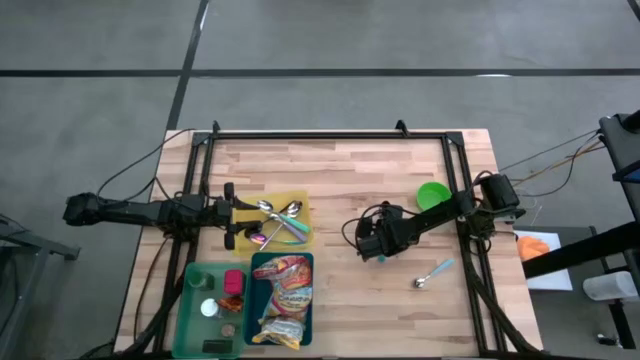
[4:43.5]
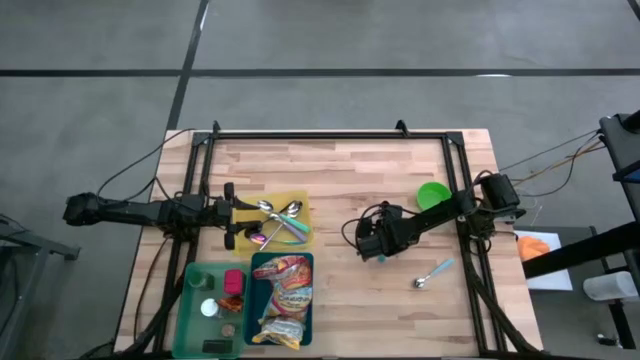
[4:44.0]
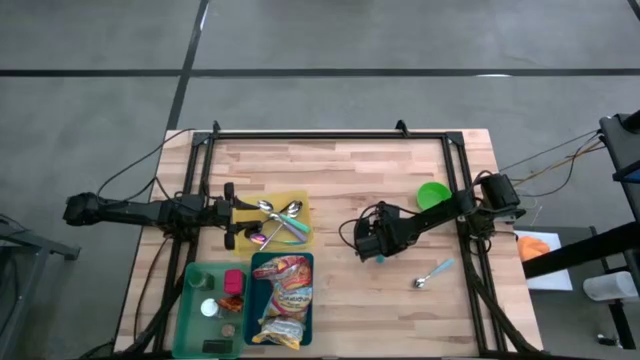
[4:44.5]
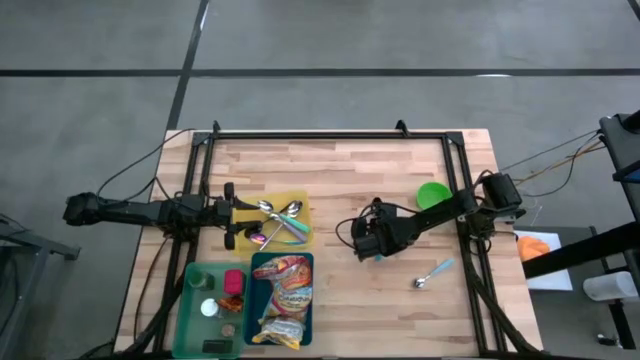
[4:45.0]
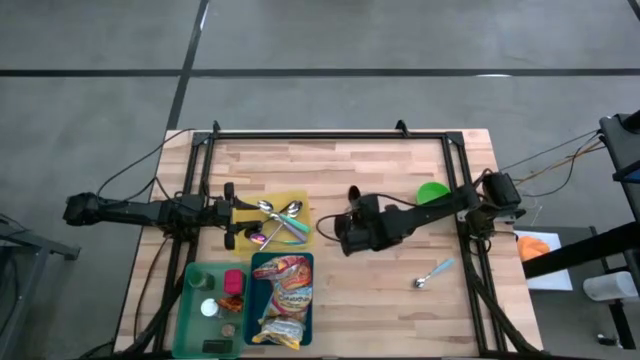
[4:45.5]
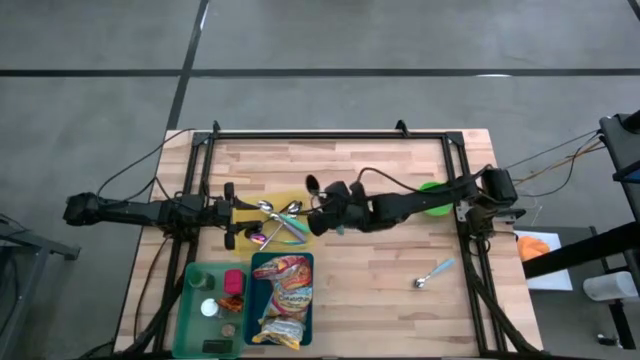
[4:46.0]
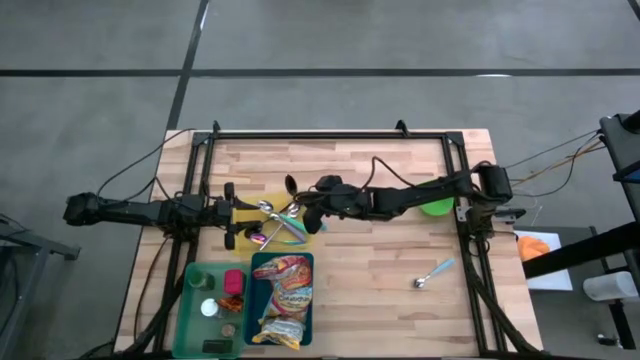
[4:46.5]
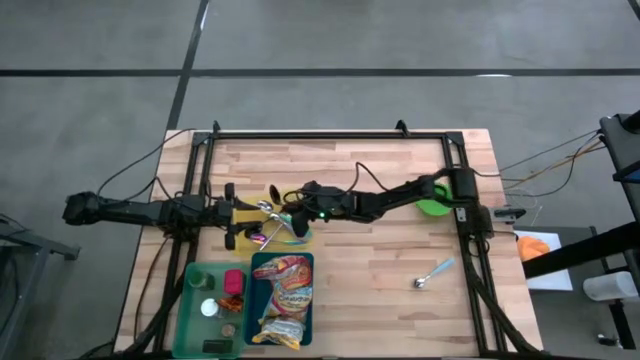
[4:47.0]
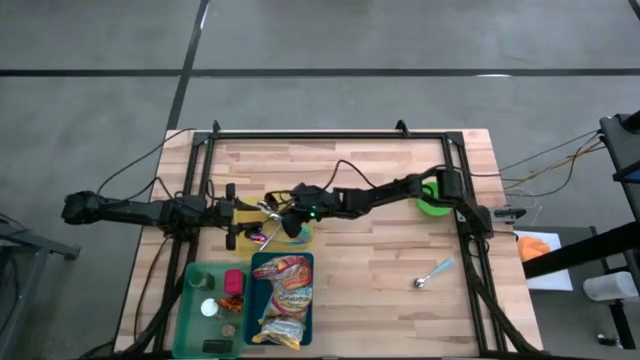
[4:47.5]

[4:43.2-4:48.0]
Put the blue spoon into the yellow bin

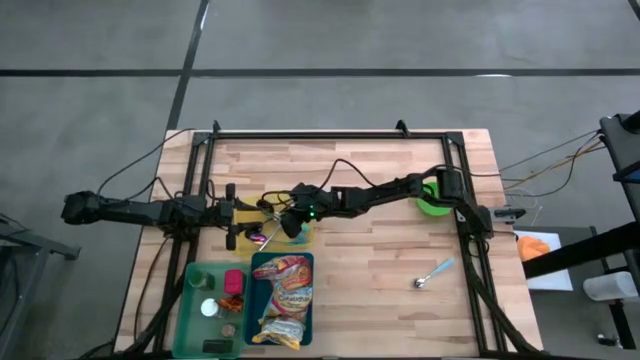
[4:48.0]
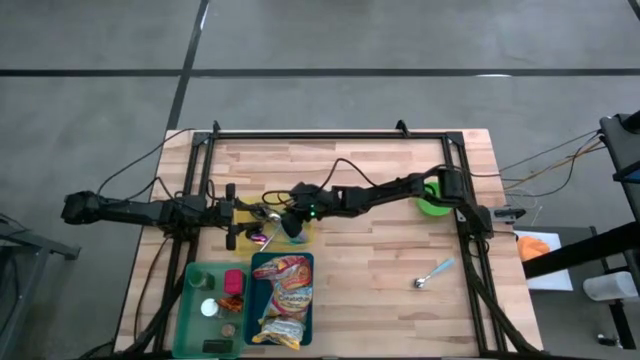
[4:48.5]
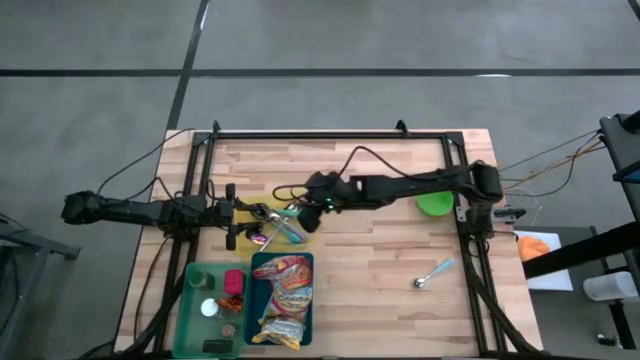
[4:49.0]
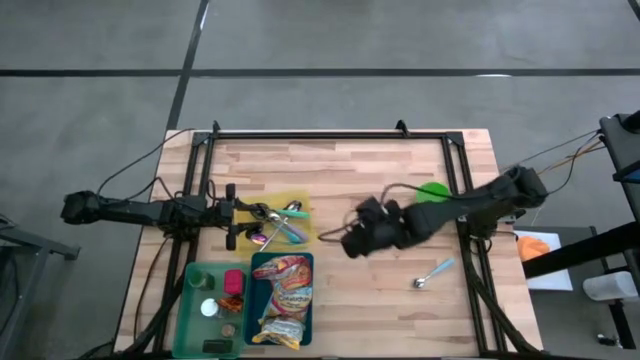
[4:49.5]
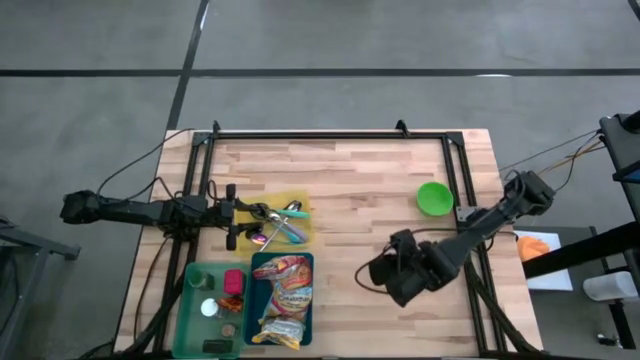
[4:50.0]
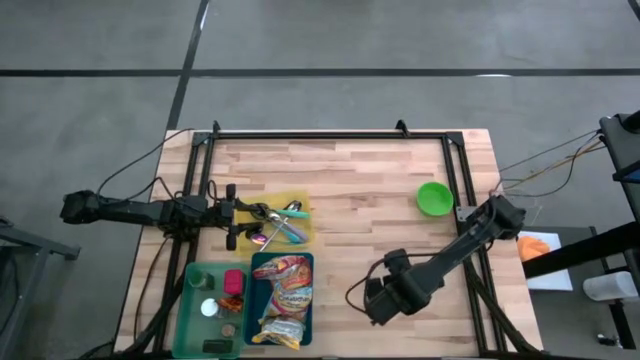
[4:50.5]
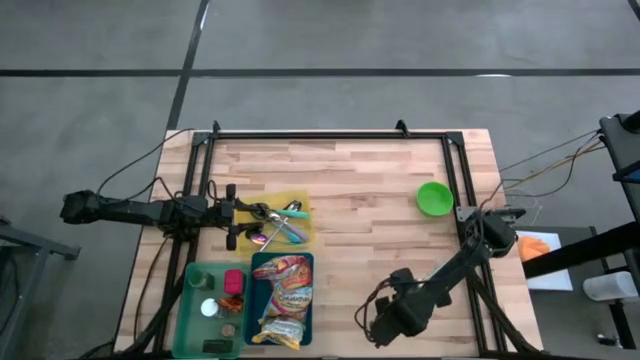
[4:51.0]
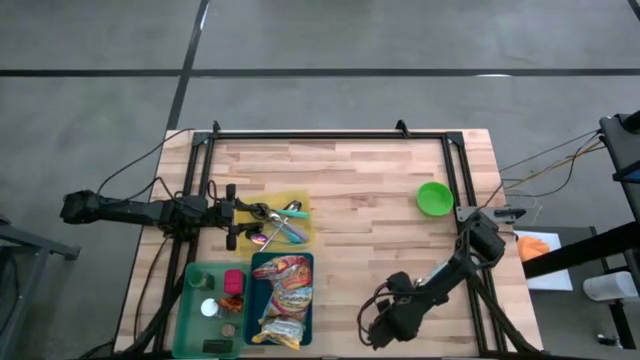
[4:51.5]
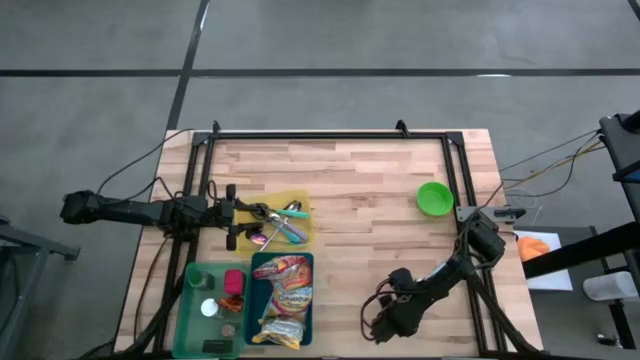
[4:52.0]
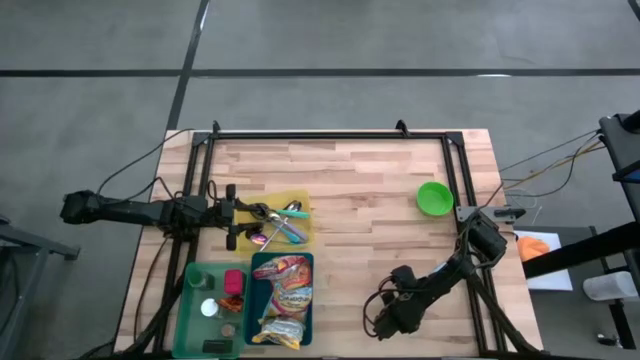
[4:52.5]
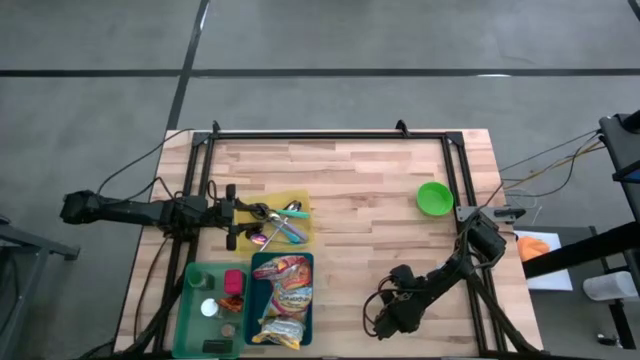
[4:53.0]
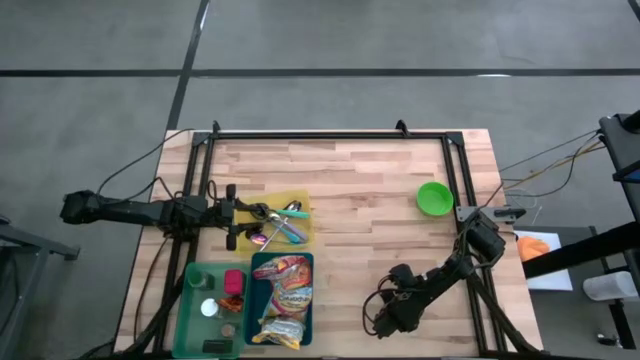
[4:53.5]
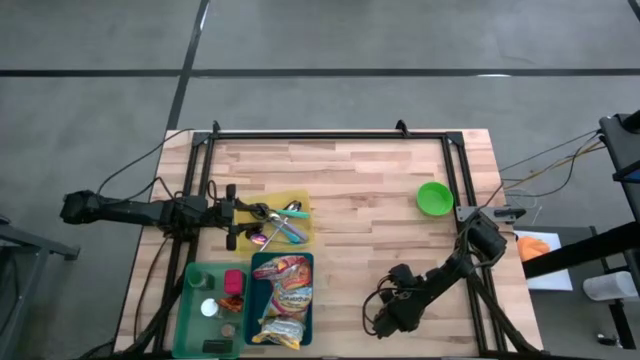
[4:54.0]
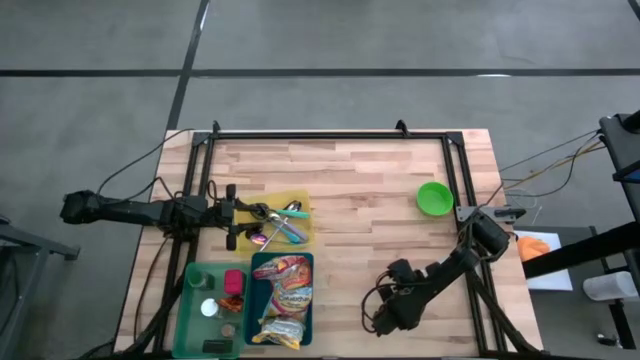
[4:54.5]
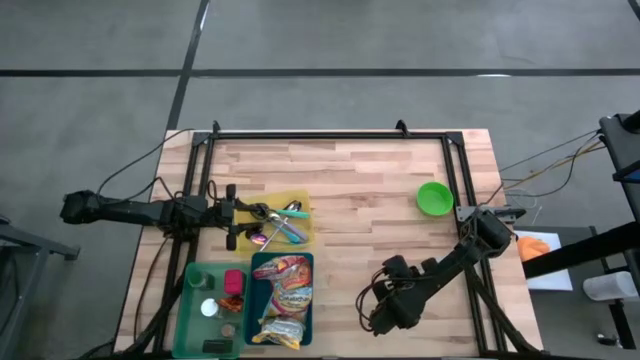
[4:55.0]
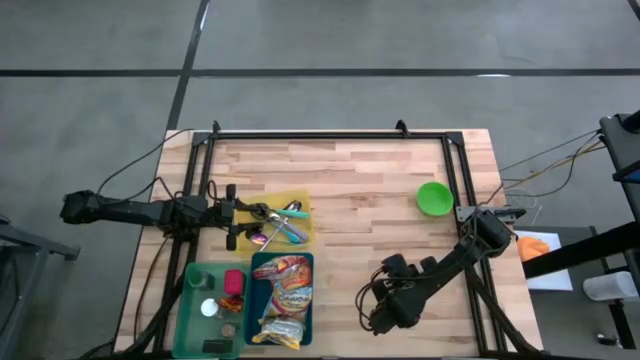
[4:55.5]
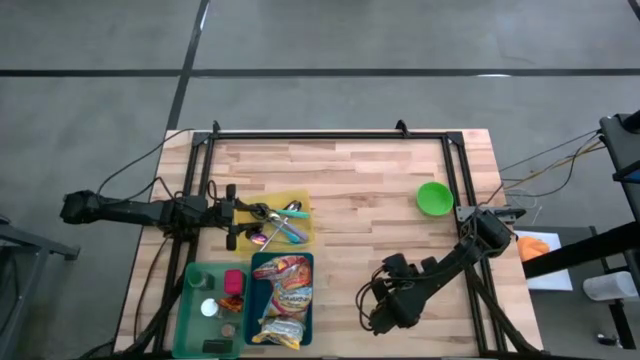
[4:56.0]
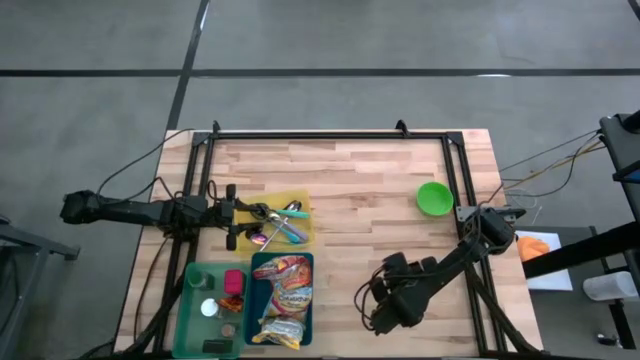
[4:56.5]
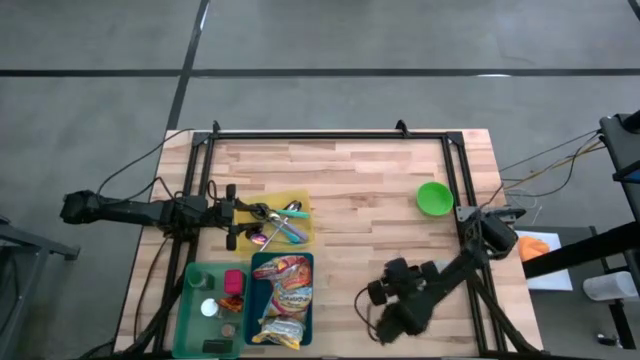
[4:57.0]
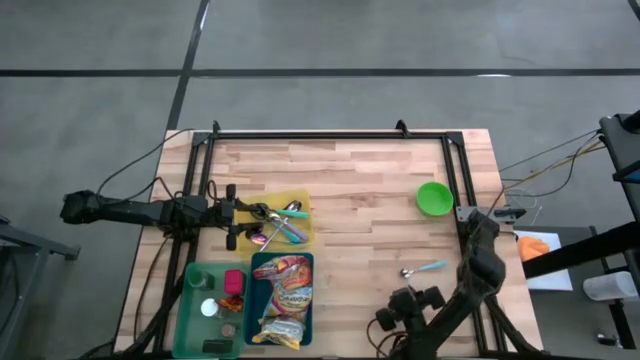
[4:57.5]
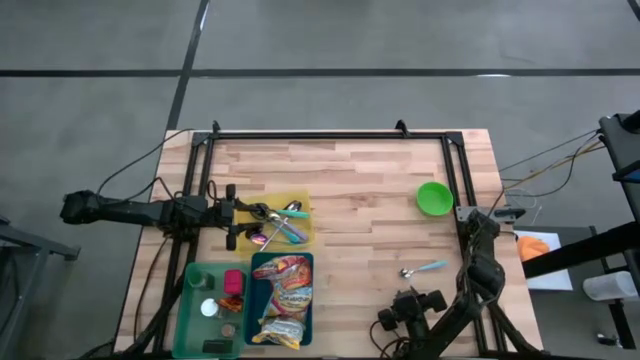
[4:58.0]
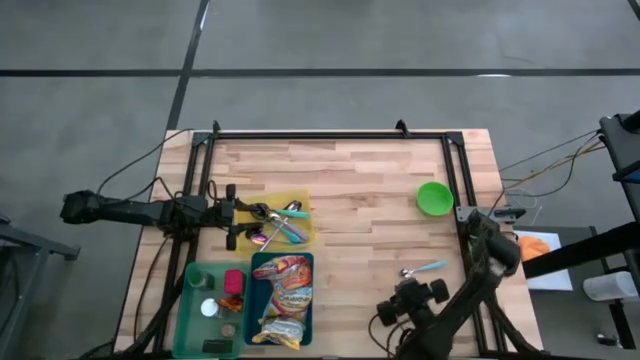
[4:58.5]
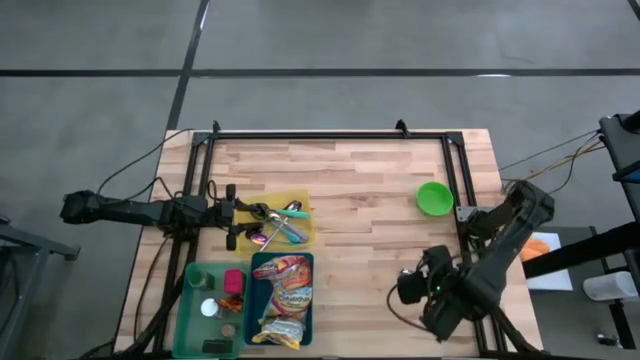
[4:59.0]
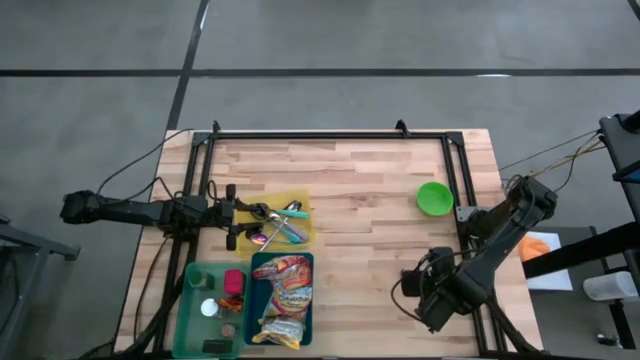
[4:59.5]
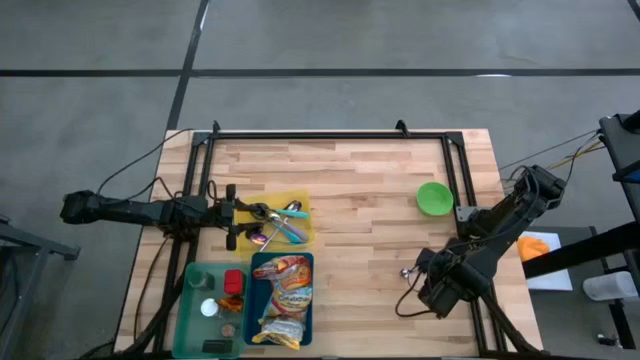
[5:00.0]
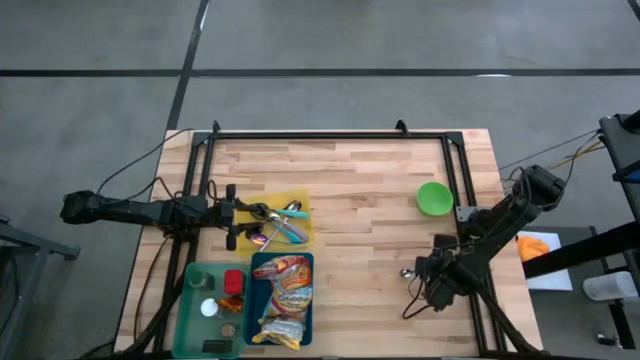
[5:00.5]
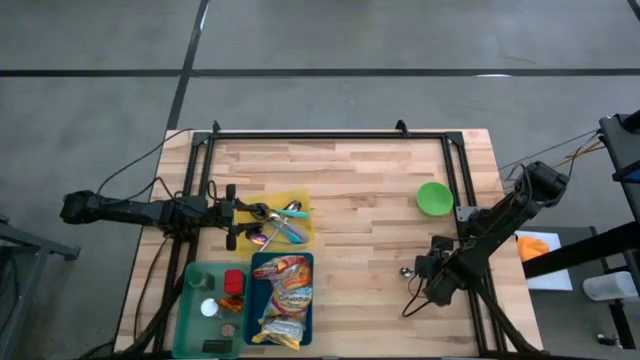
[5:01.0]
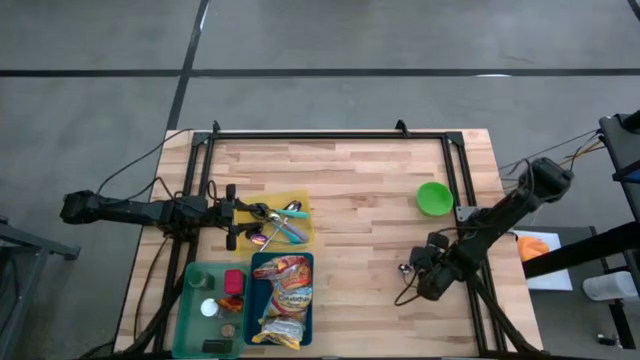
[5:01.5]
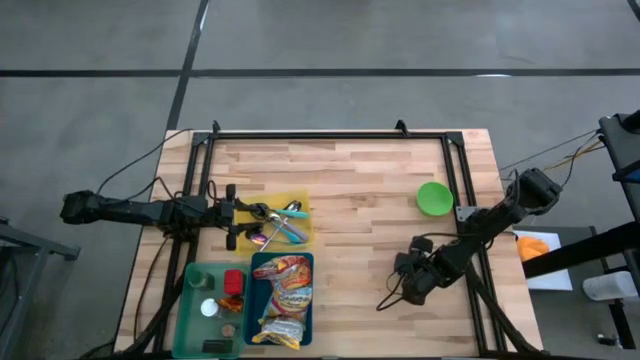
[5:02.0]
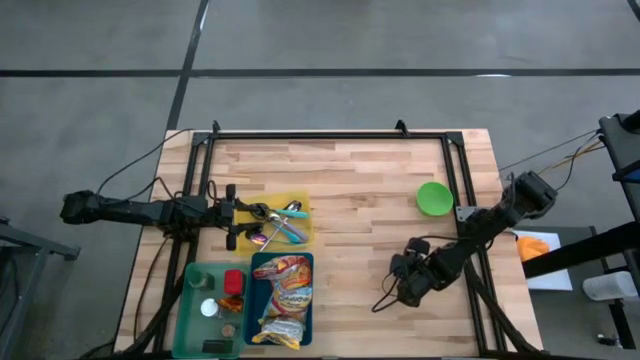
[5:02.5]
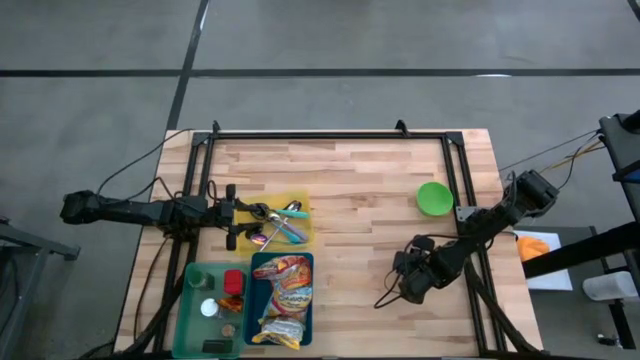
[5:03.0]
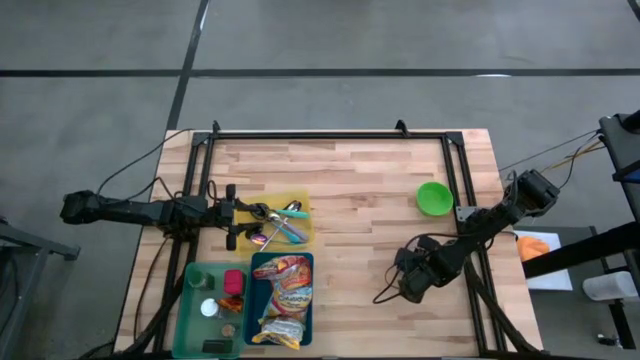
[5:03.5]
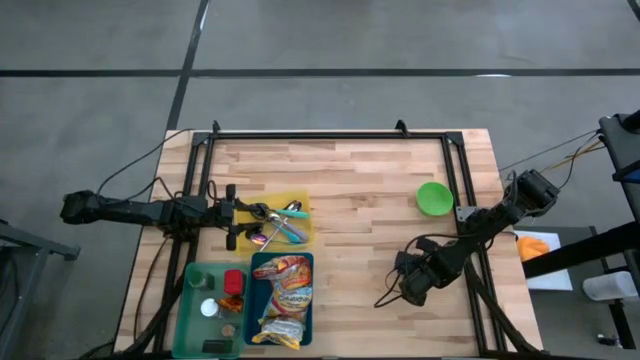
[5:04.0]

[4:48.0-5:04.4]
Put the light blue spoon into the yellow bin
